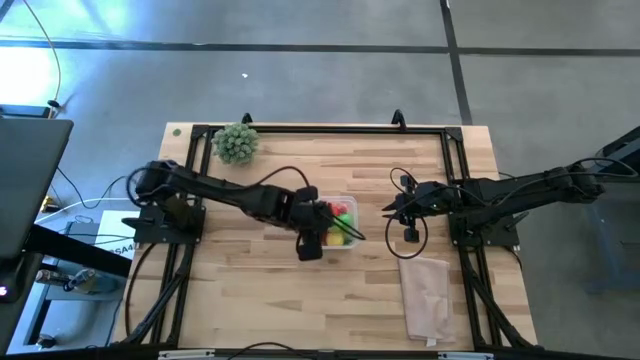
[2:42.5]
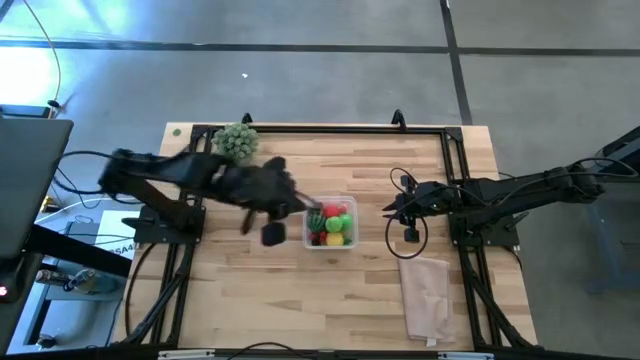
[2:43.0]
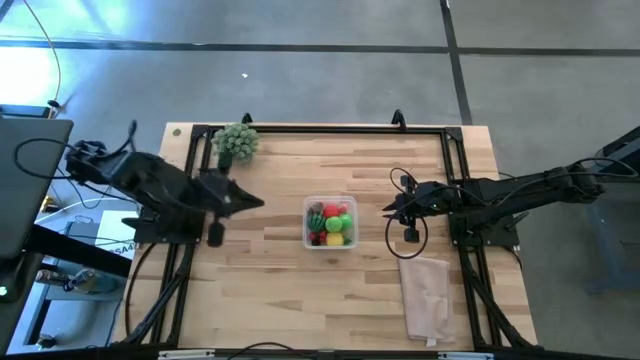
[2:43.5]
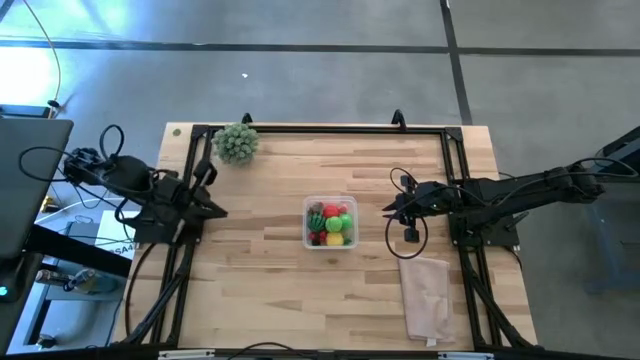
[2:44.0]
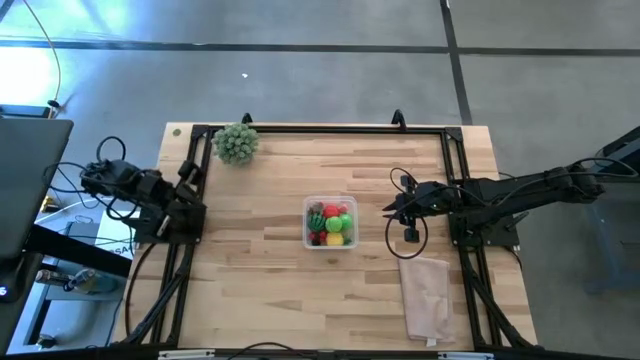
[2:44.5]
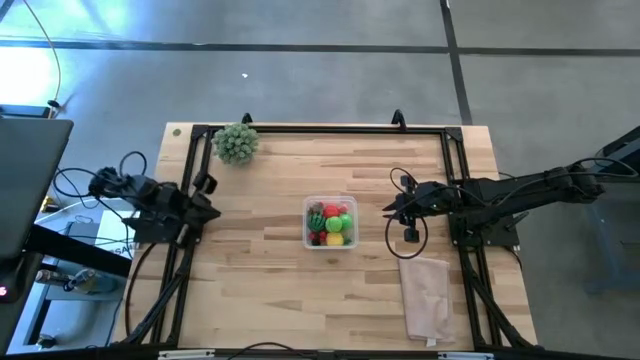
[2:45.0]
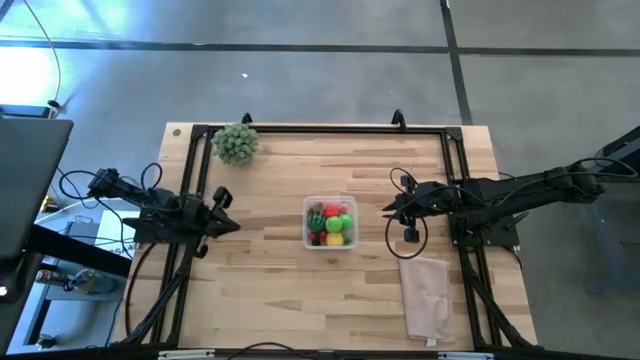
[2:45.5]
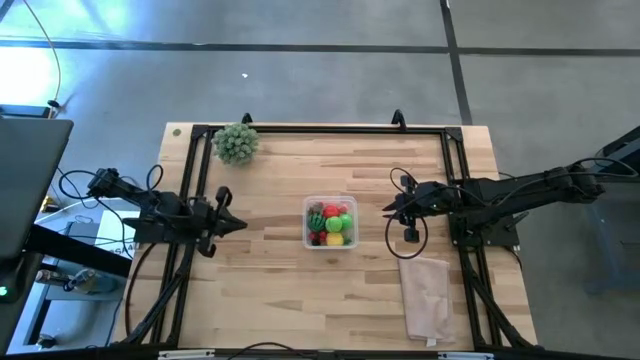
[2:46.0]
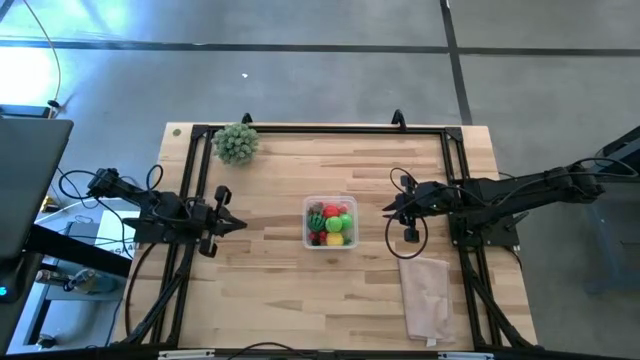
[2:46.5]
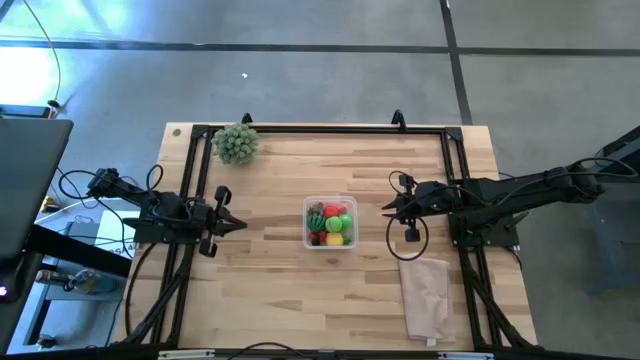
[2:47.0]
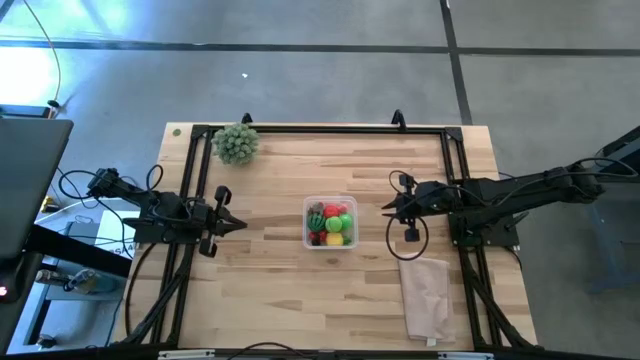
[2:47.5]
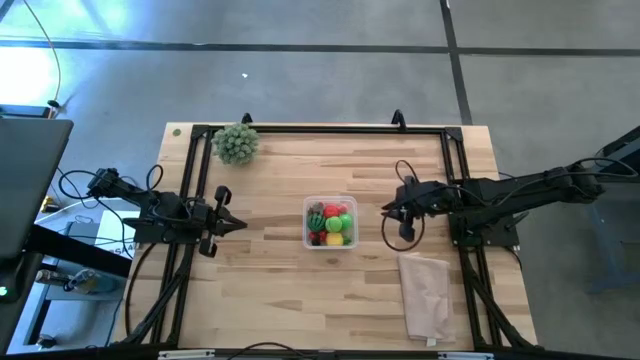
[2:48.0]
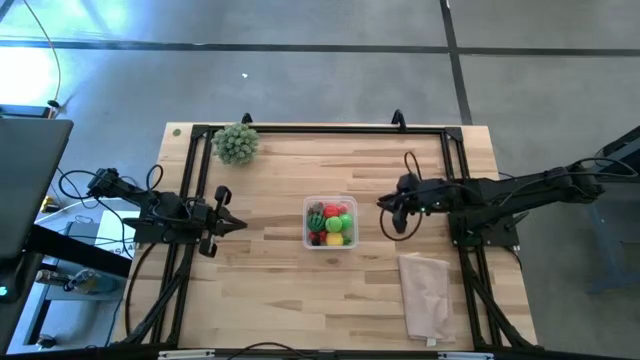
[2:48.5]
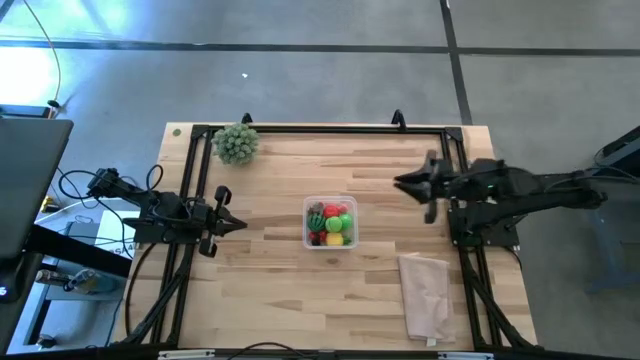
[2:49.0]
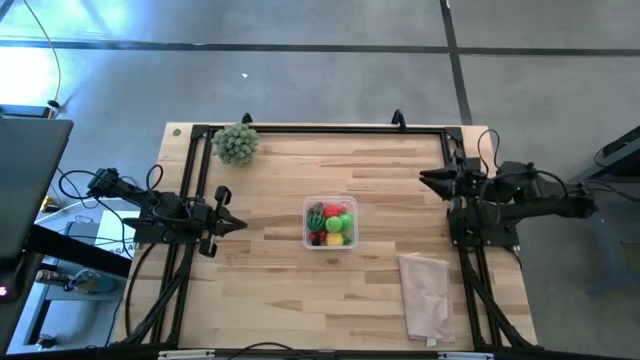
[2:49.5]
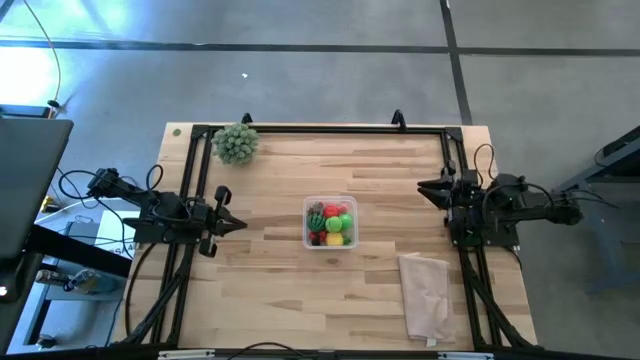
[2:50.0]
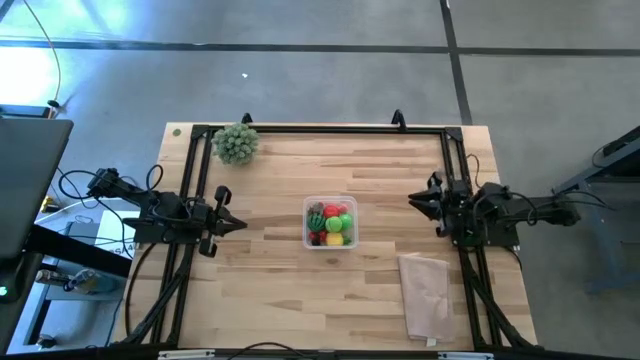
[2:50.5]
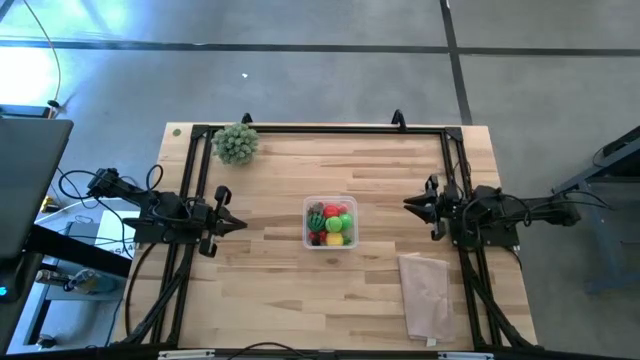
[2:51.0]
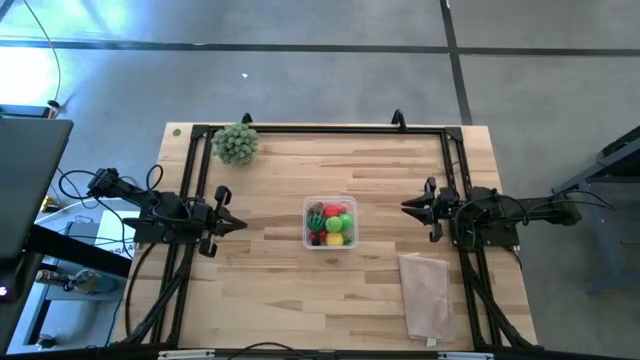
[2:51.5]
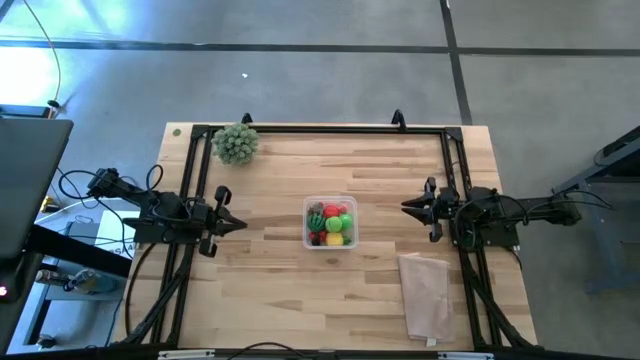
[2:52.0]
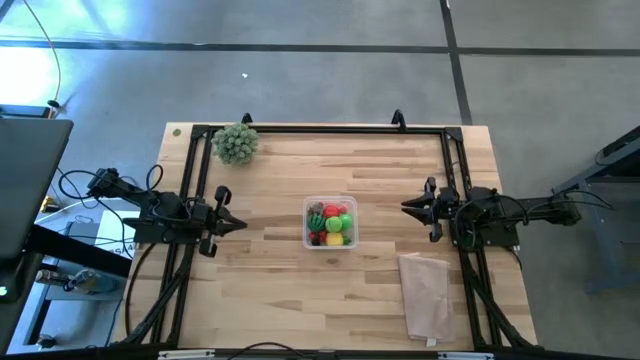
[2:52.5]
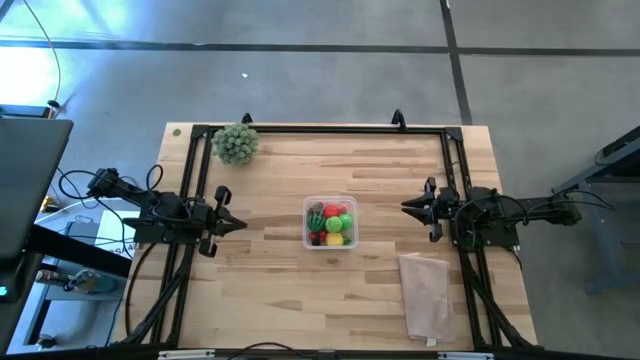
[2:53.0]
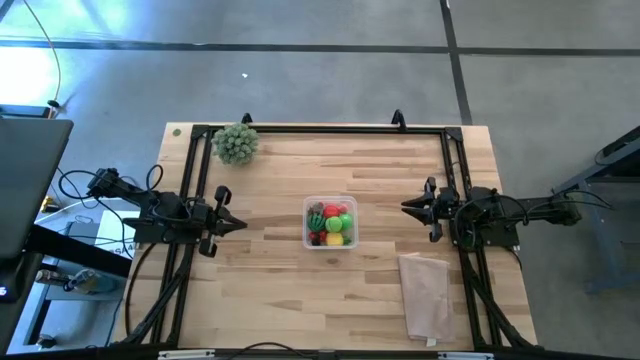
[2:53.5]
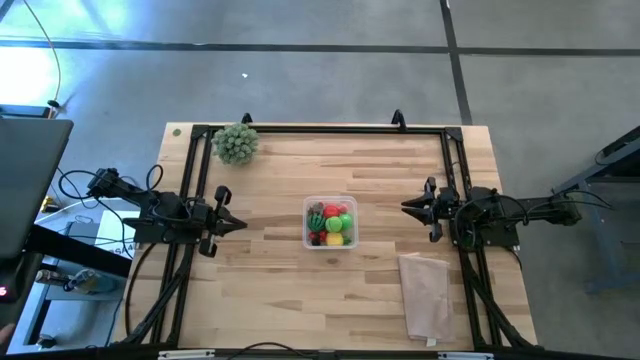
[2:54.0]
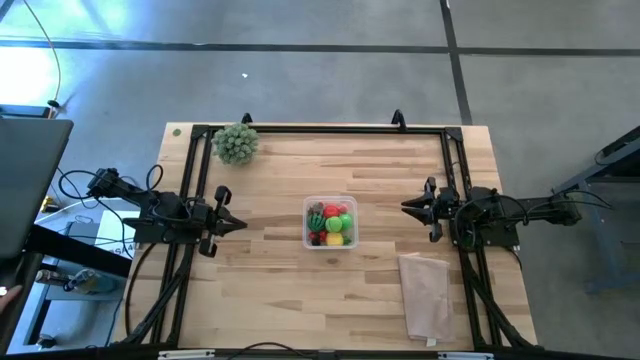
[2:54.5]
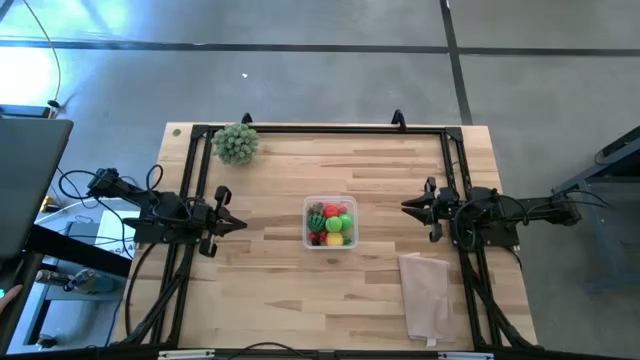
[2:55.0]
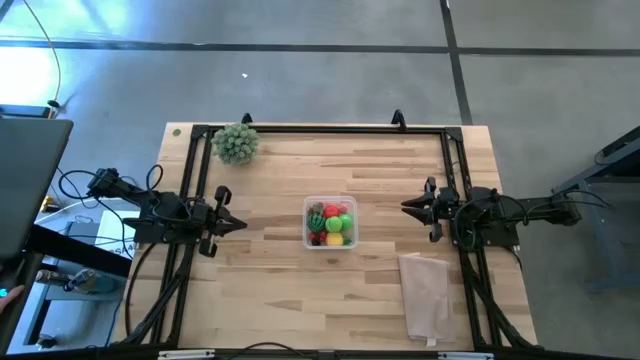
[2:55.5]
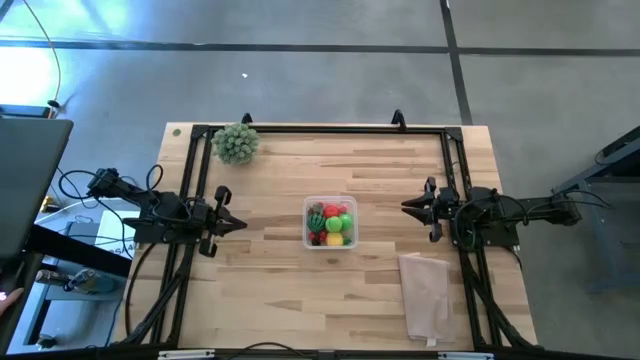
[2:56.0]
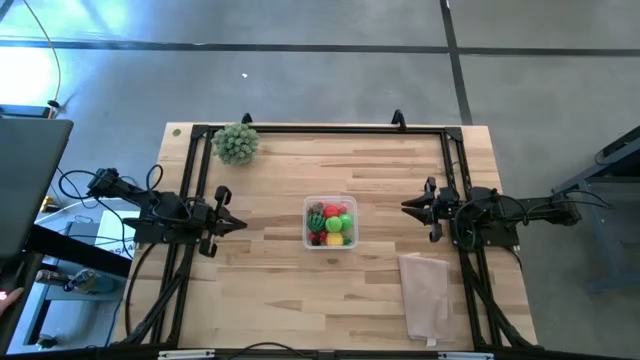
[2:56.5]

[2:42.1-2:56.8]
Task: Pick and placing Produce into tupperware
Return to Home Position

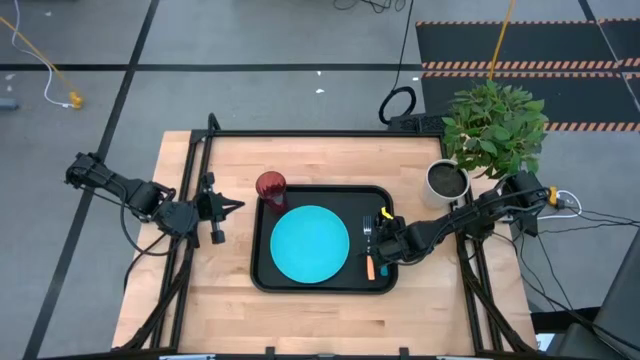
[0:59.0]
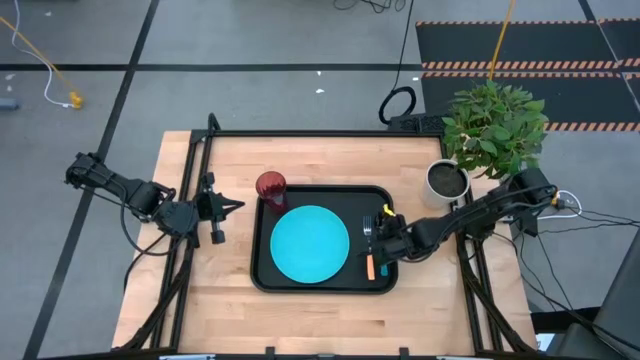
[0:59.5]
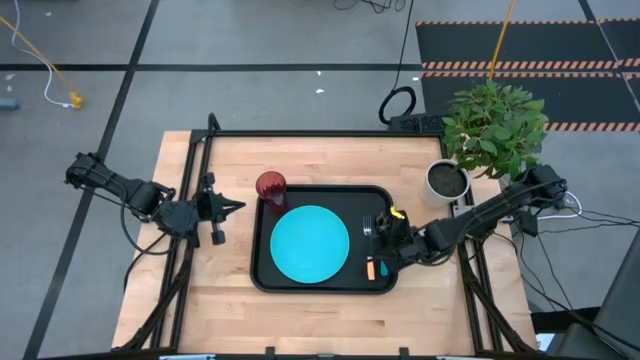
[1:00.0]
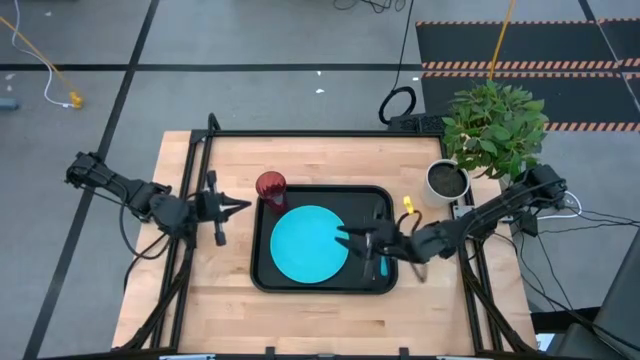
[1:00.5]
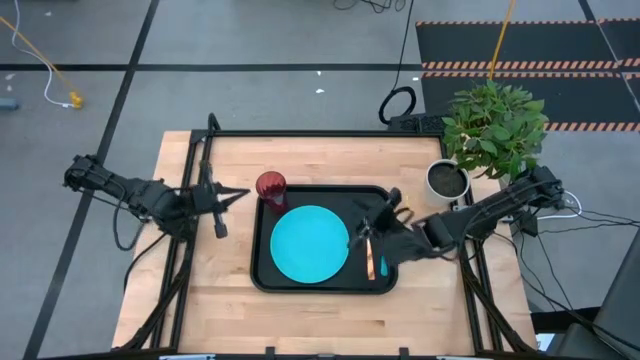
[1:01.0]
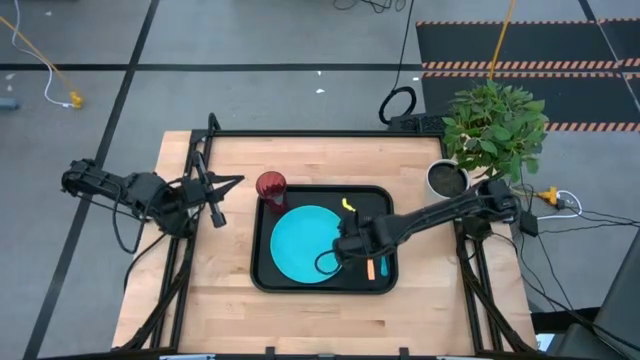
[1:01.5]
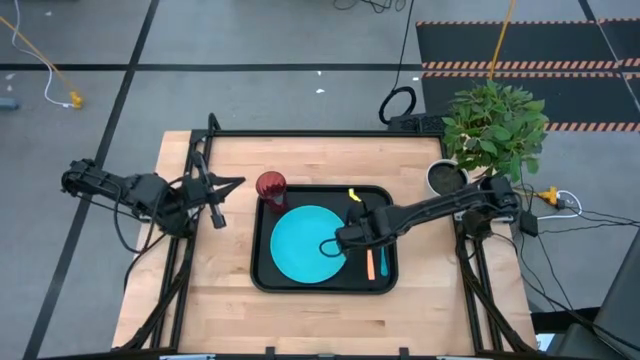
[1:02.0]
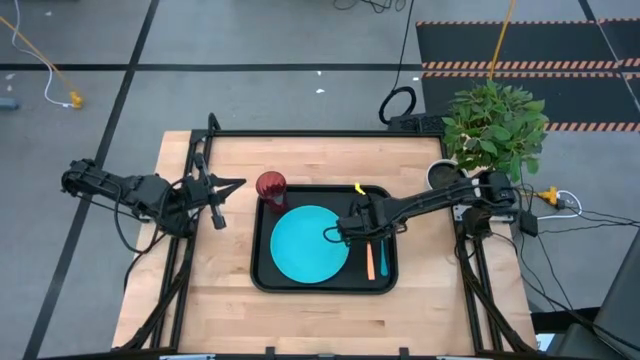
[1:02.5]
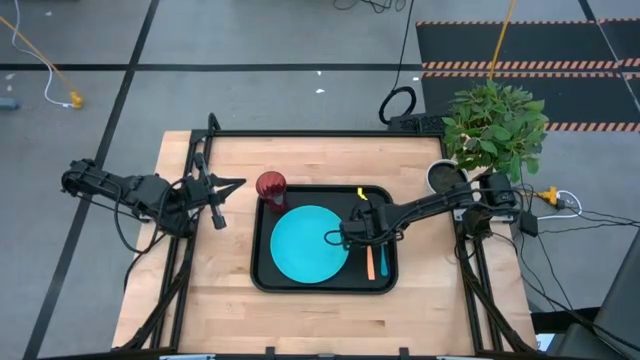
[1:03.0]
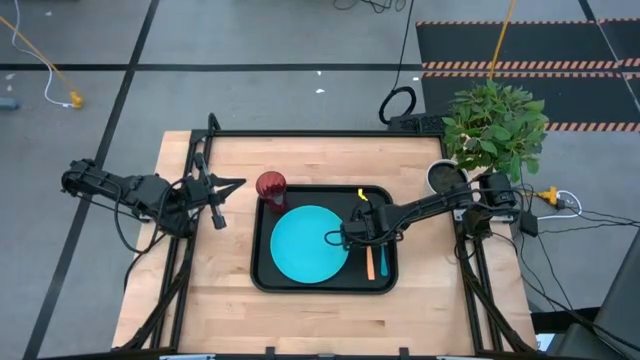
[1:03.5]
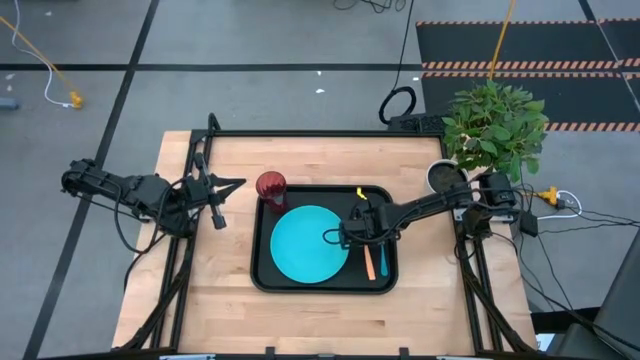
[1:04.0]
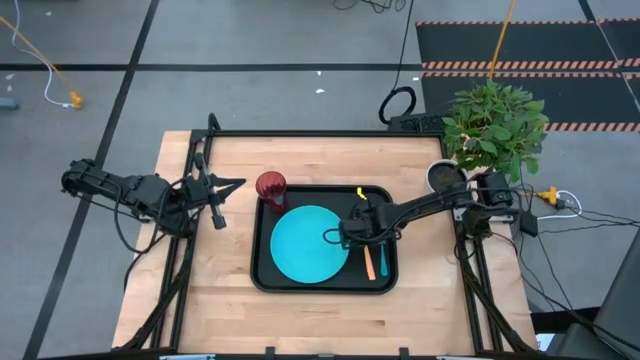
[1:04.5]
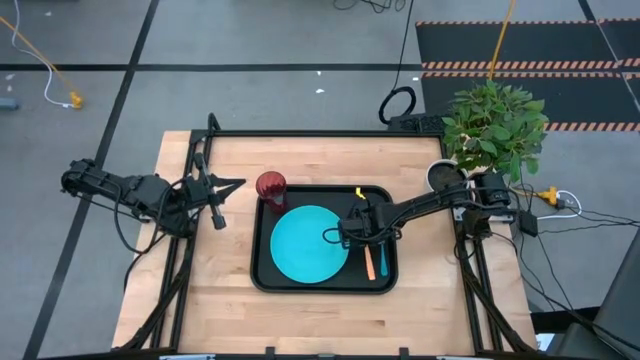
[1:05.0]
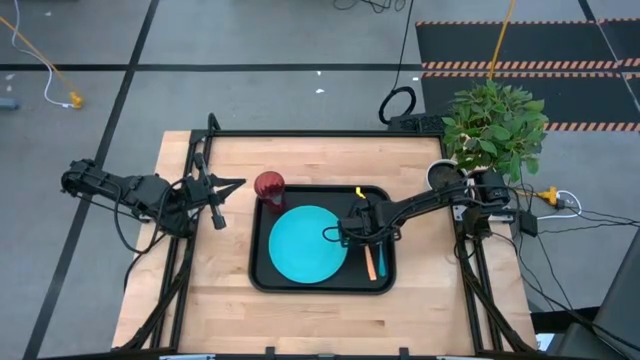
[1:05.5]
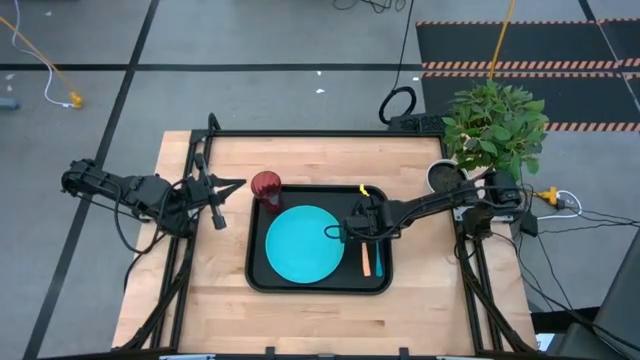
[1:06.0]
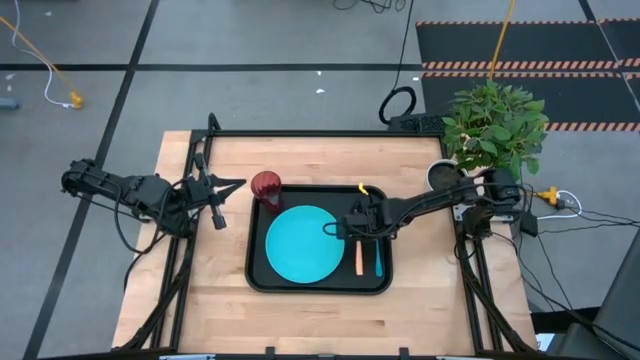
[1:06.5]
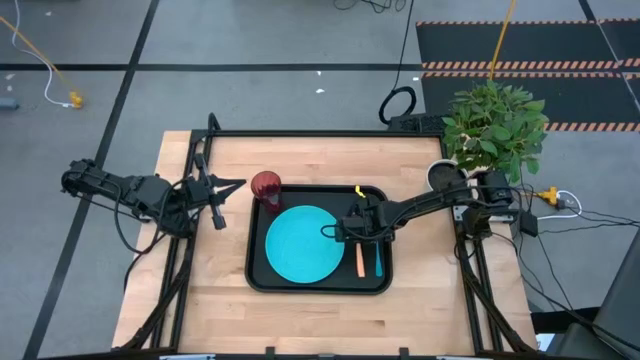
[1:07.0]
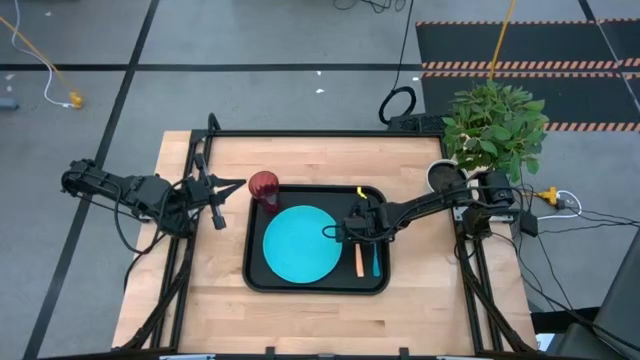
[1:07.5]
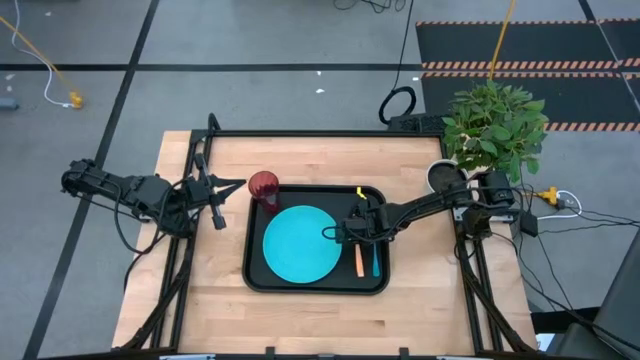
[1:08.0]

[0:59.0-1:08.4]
Task: Pick and place plate/cup/fork/spoon on tray
Move the yellow fork on the black serving tray
